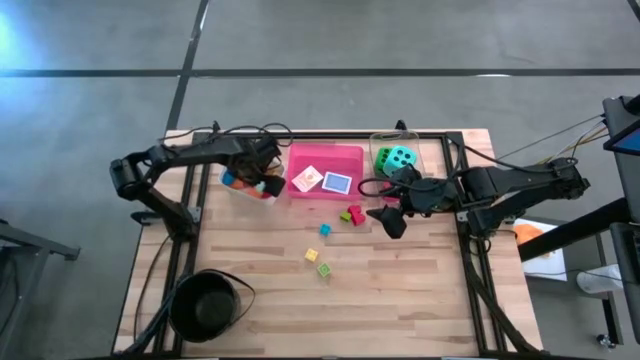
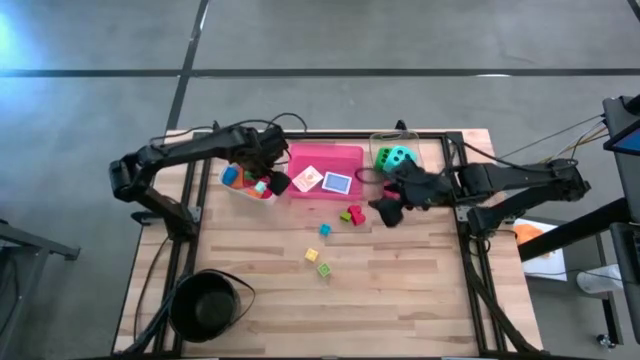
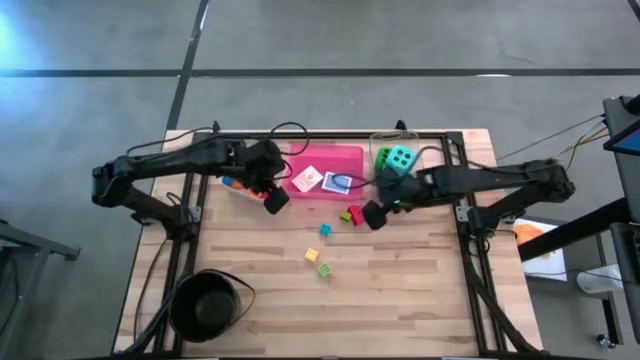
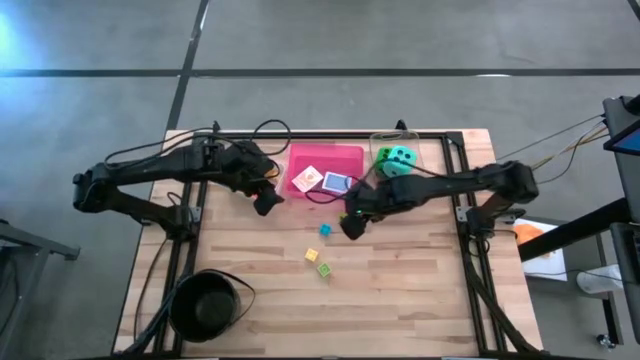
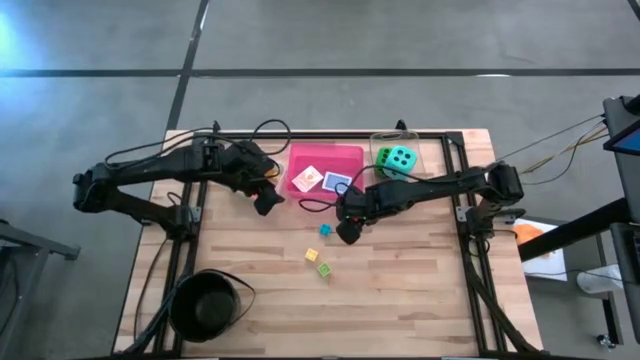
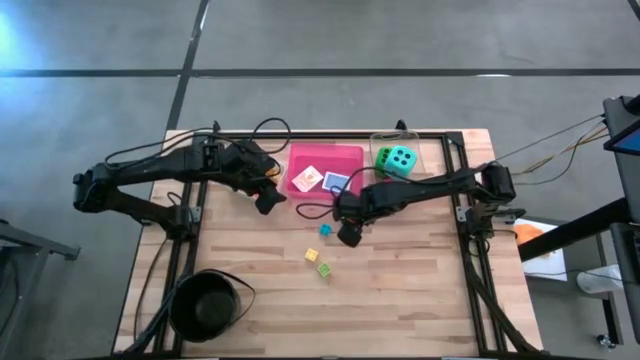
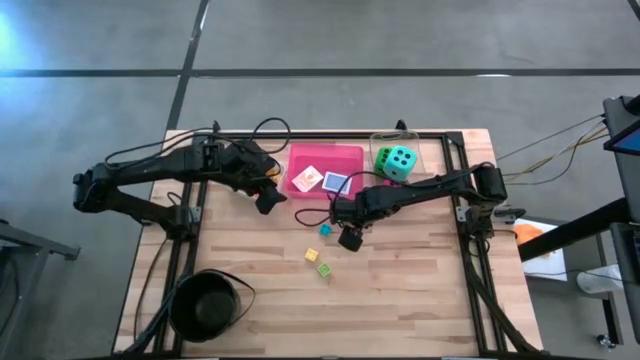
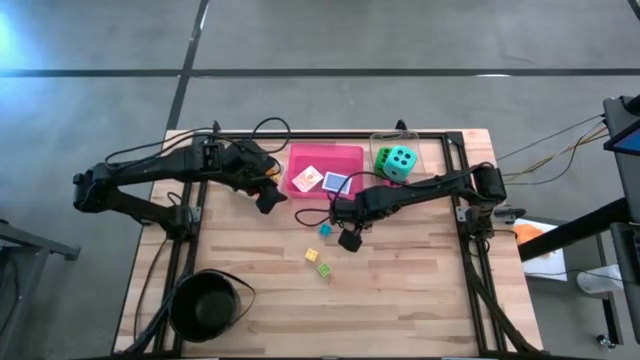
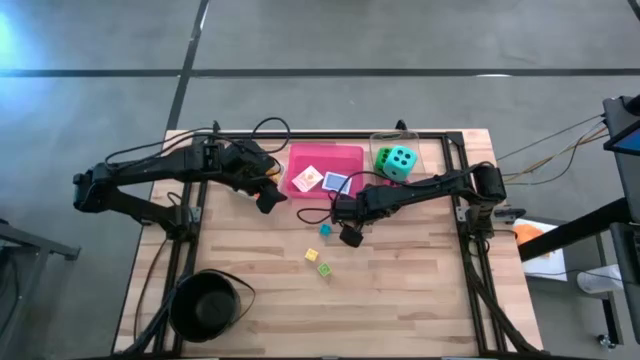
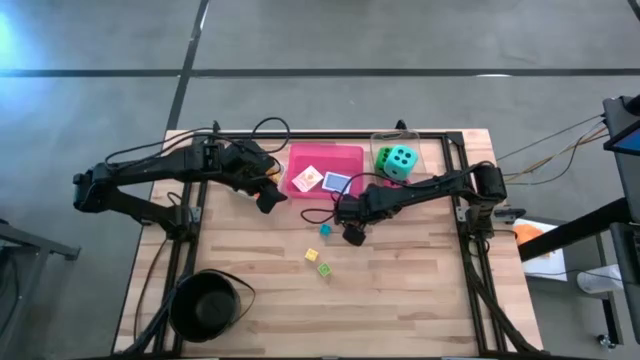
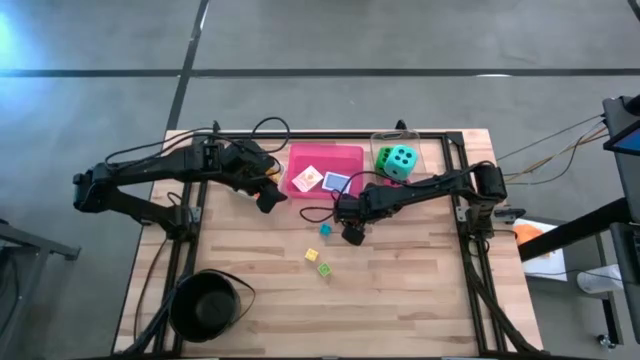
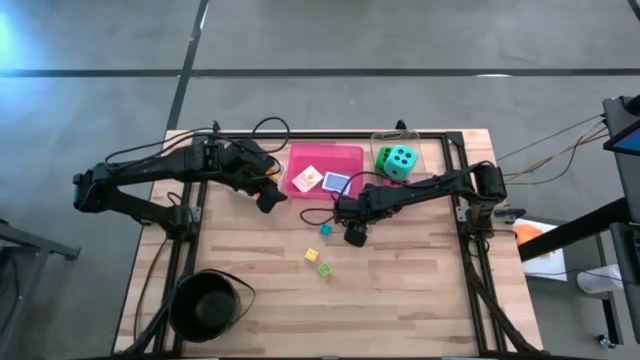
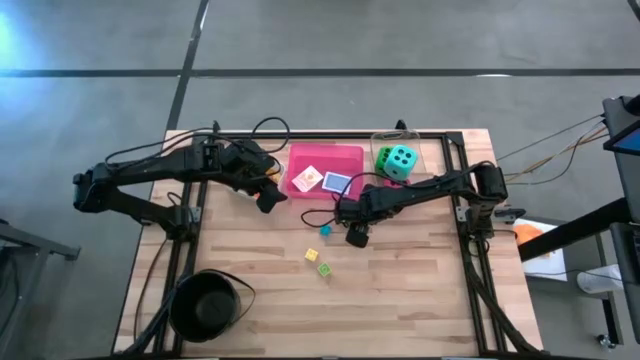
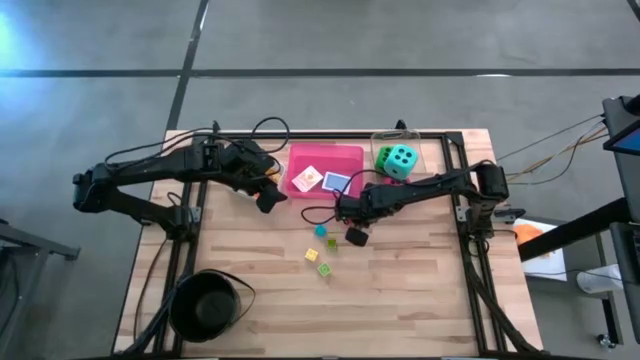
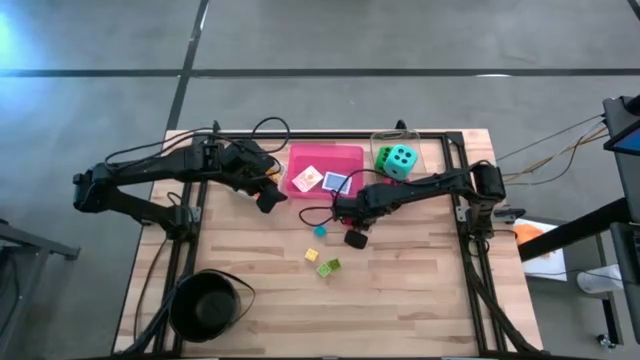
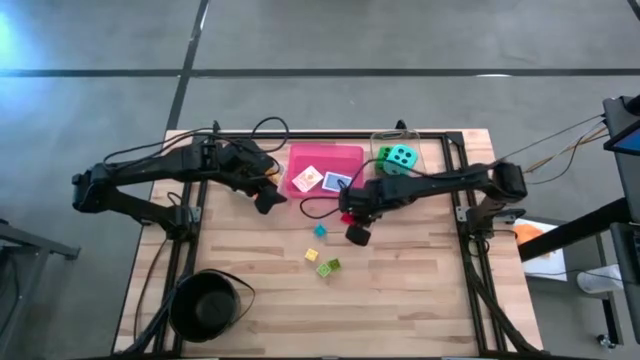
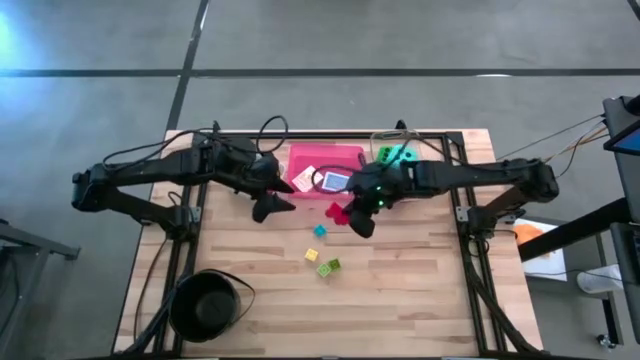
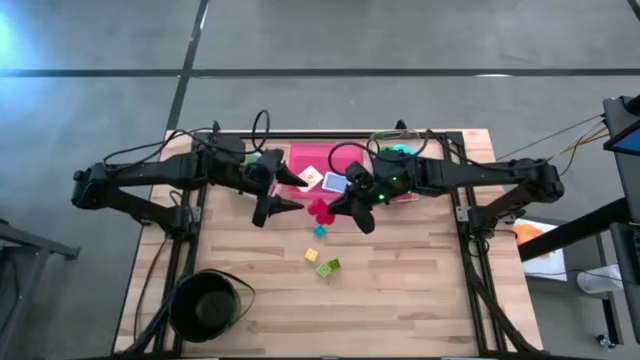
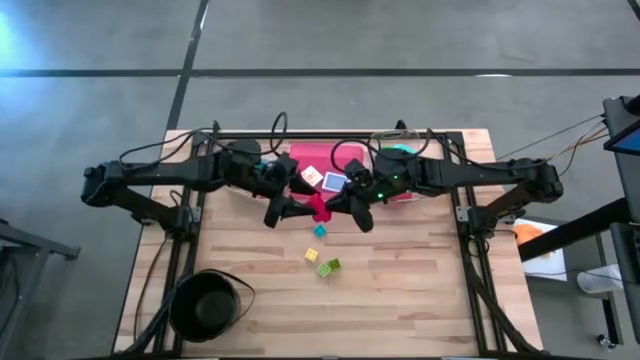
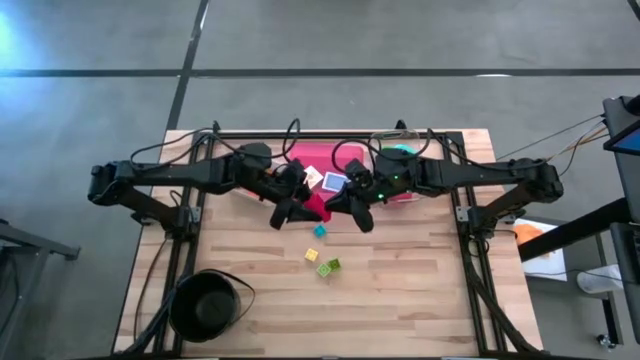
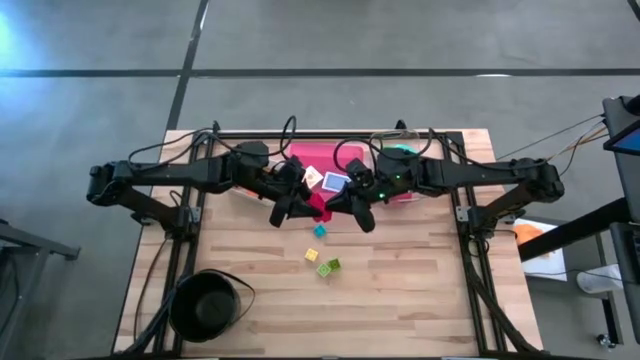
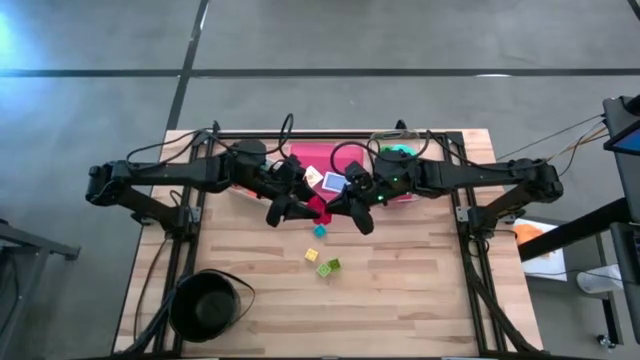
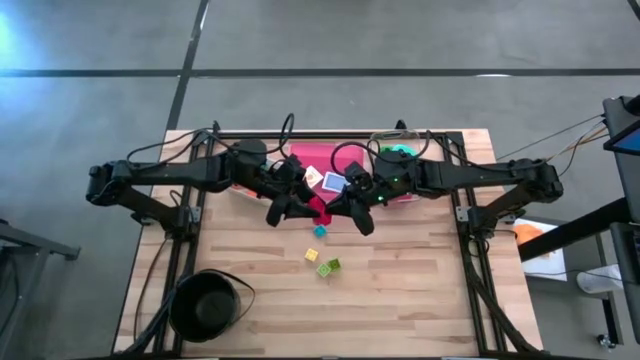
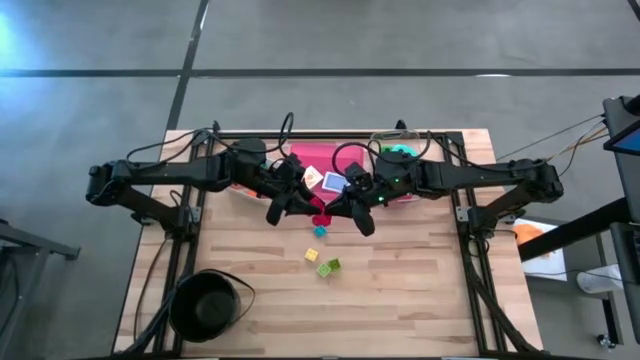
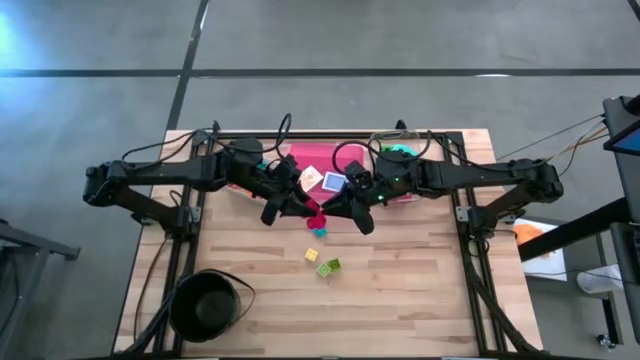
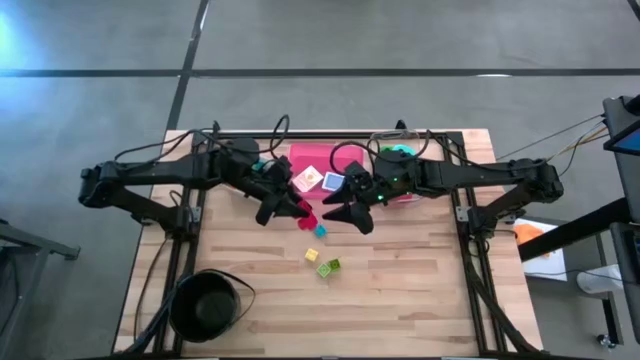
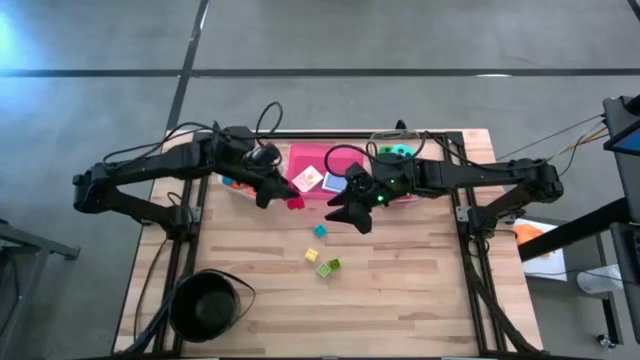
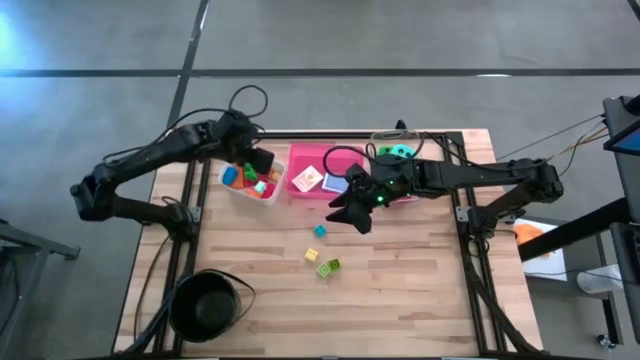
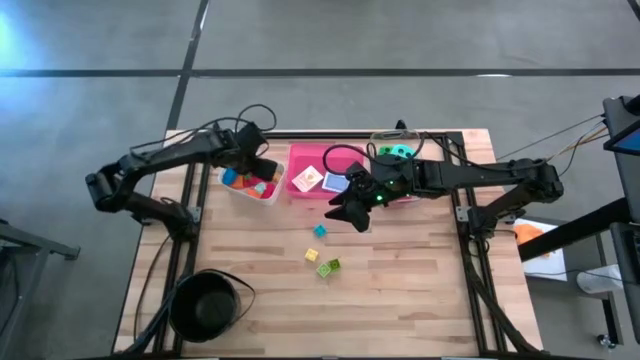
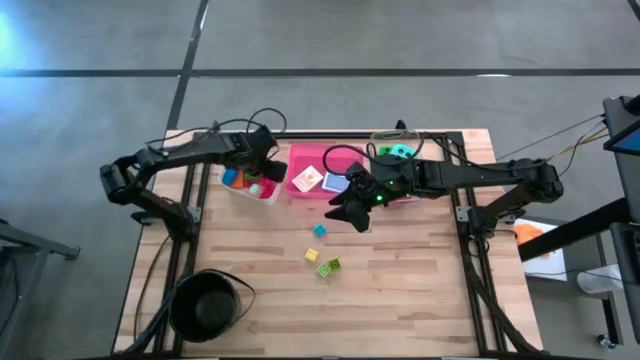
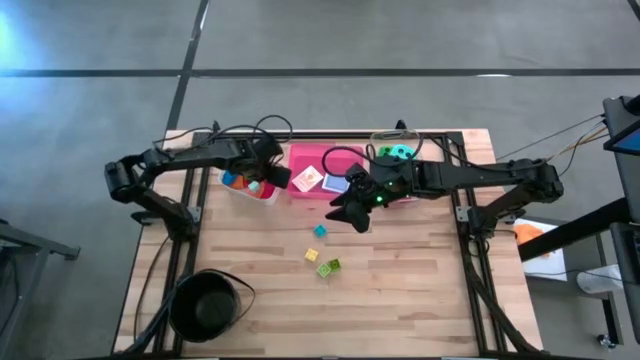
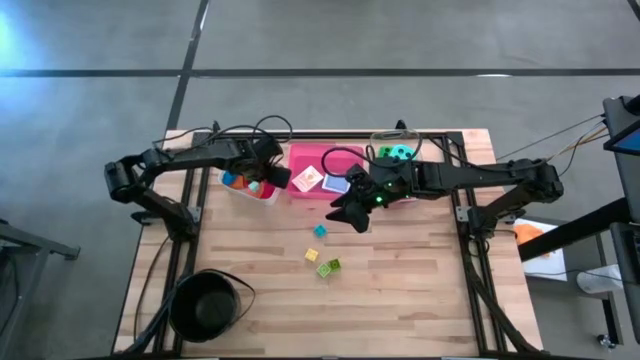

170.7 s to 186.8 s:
Task: Pick & Place Toys
Put the red game piece into the white bin

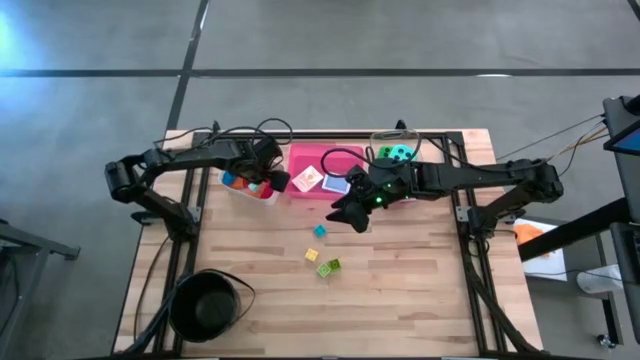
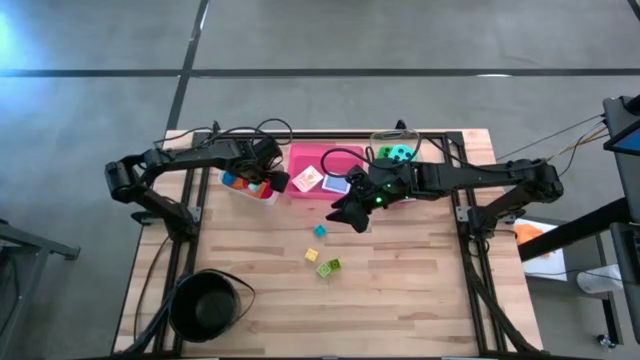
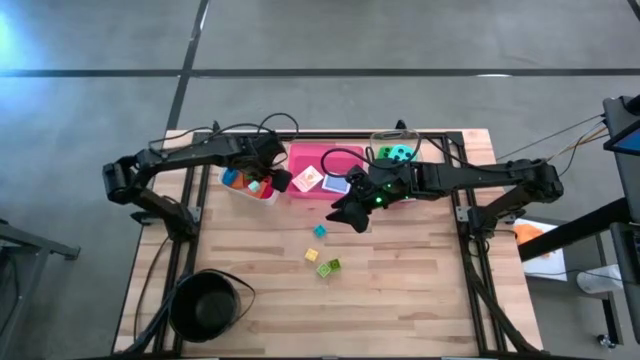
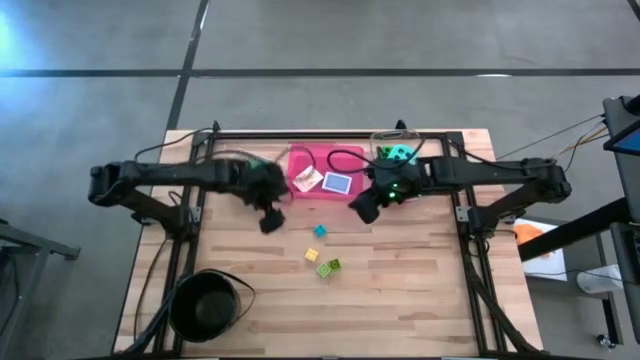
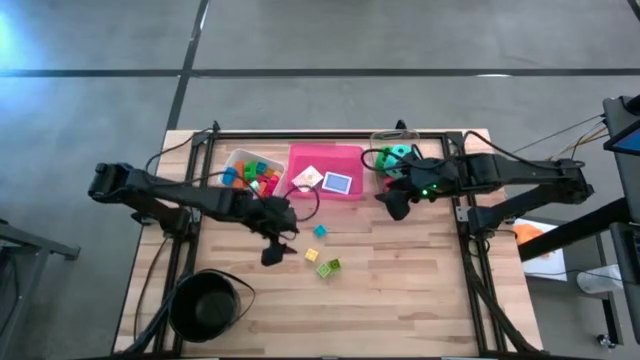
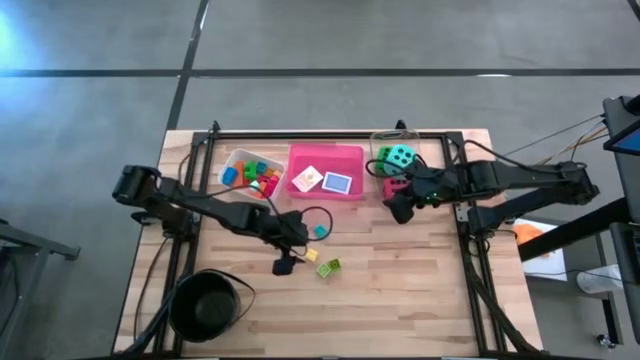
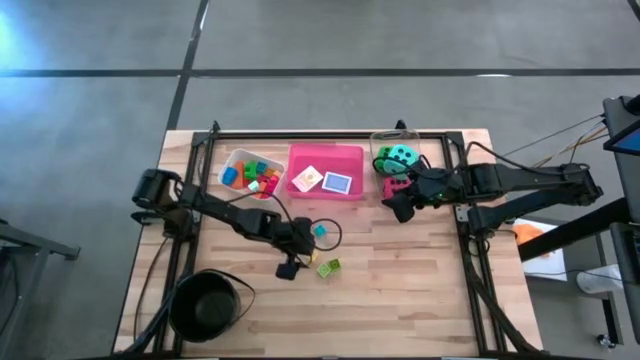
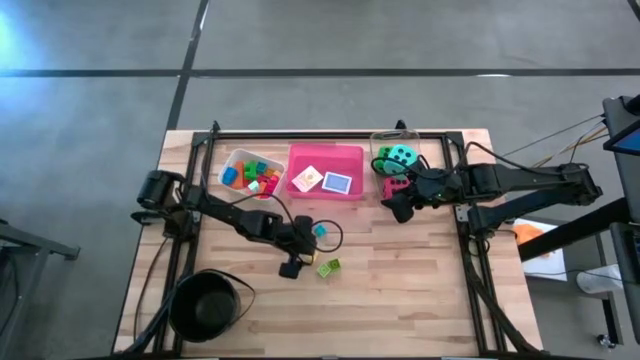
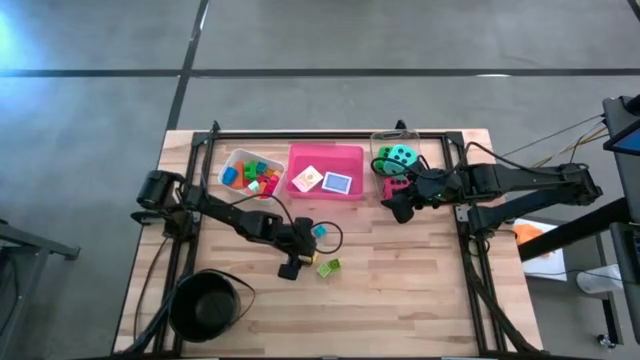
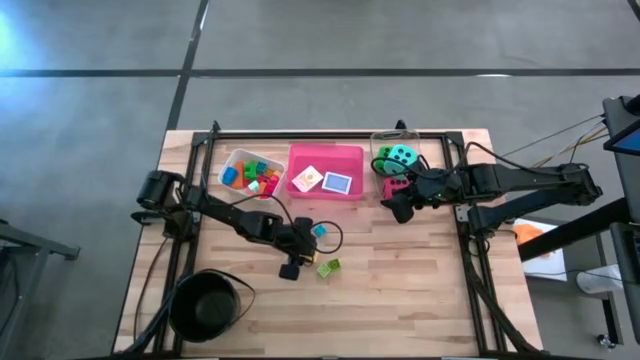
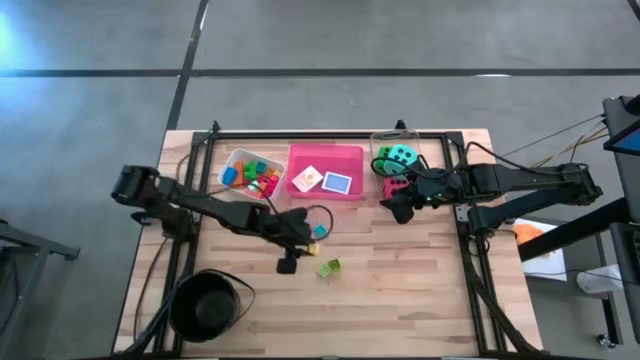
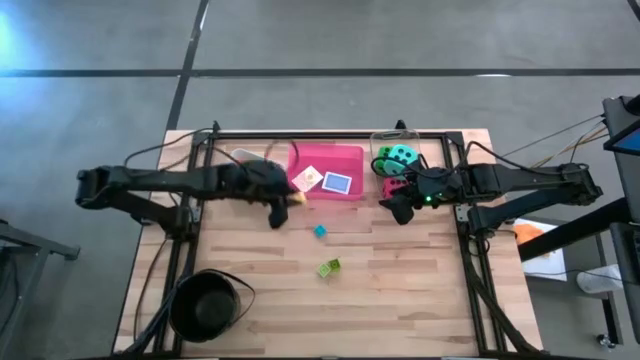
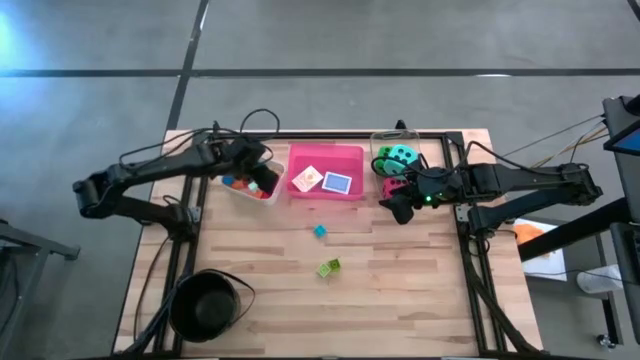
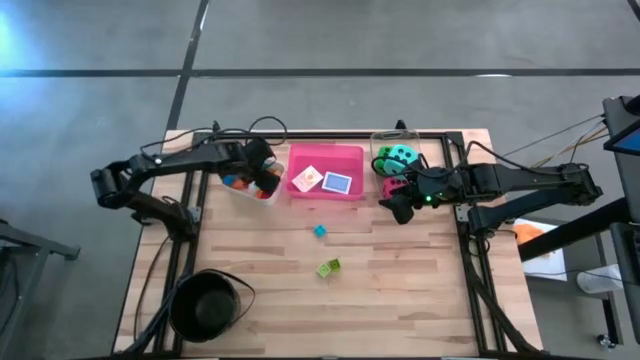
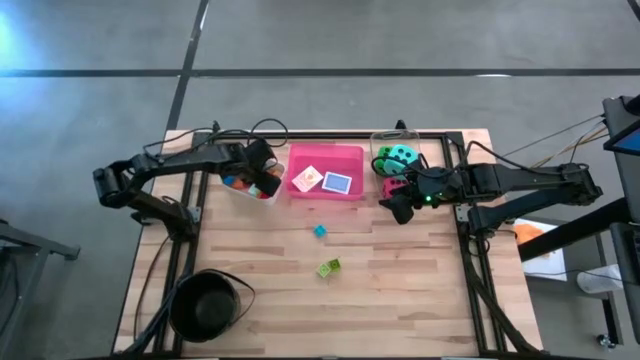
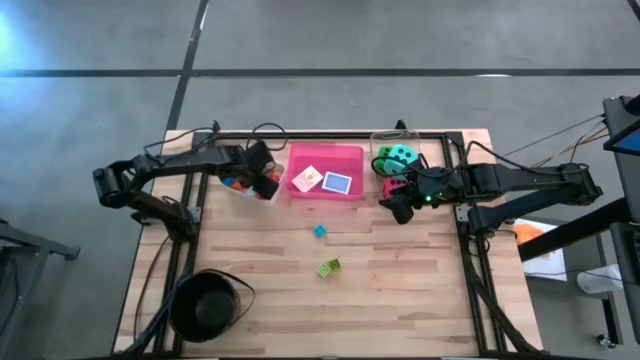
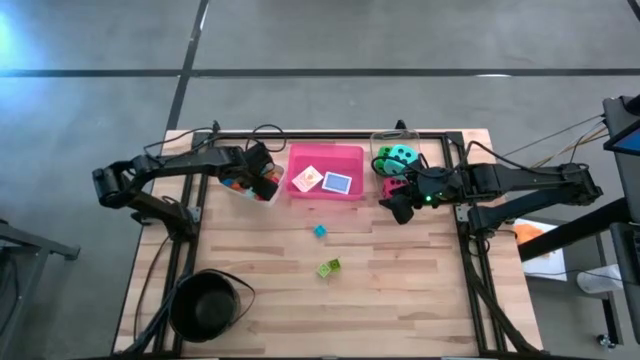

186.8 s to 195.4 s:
Put the light yellow game piece into the white bin
